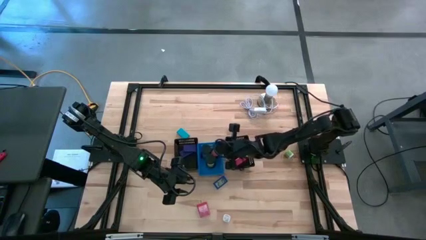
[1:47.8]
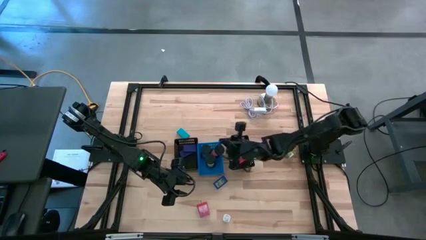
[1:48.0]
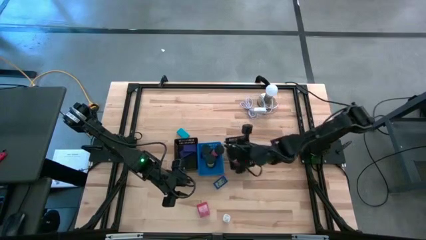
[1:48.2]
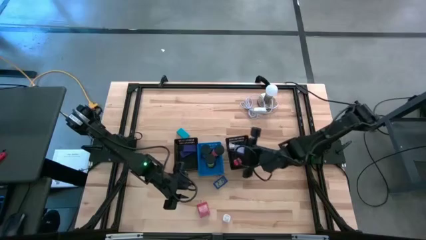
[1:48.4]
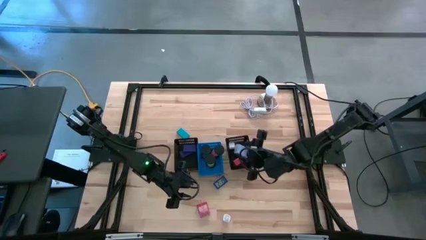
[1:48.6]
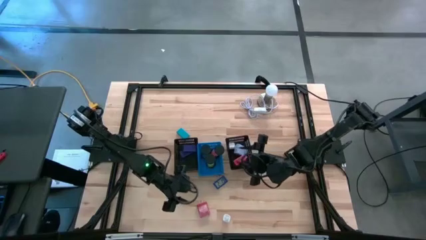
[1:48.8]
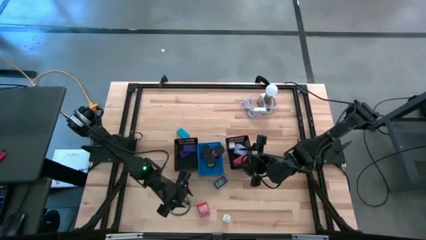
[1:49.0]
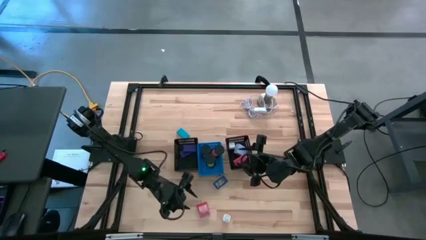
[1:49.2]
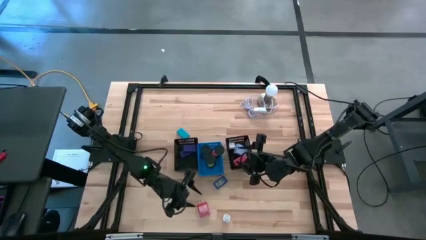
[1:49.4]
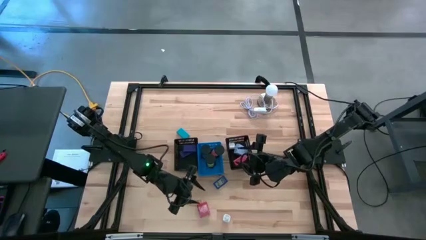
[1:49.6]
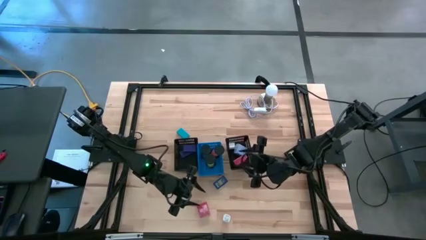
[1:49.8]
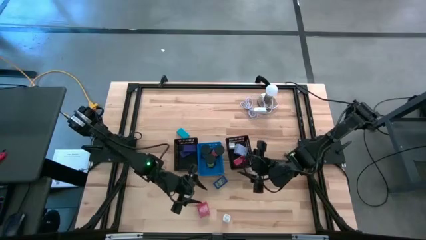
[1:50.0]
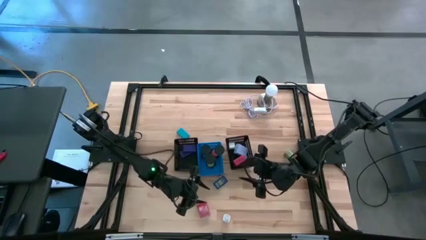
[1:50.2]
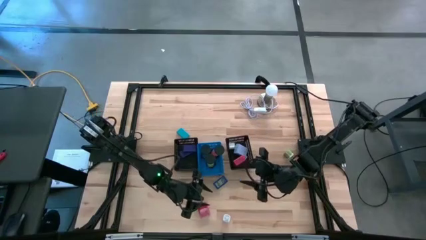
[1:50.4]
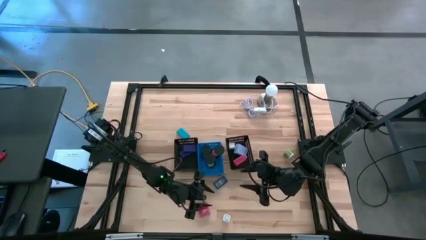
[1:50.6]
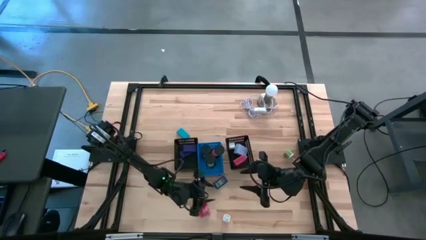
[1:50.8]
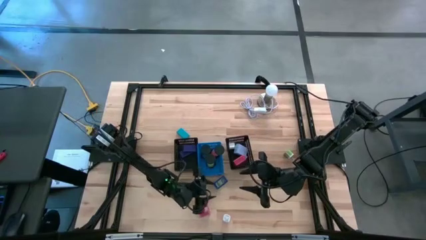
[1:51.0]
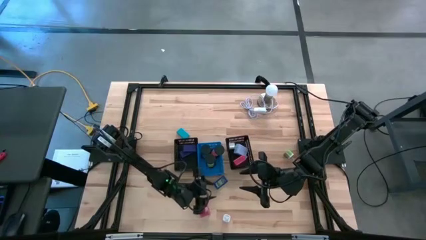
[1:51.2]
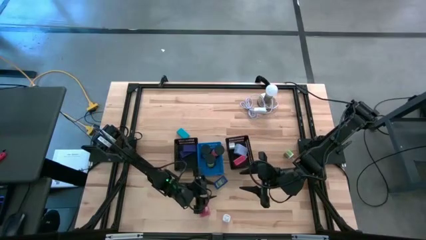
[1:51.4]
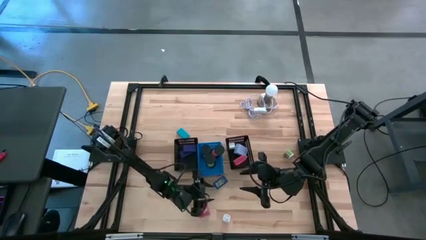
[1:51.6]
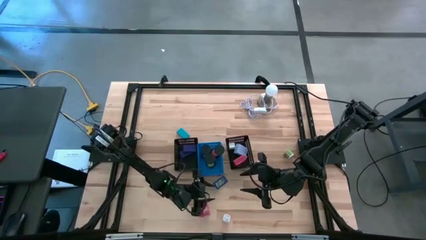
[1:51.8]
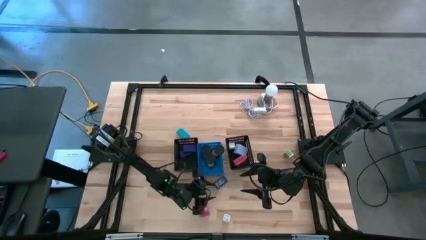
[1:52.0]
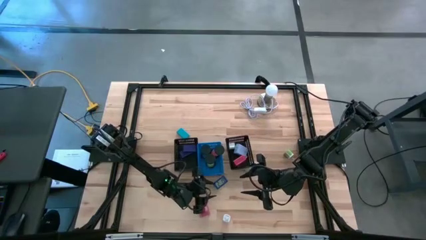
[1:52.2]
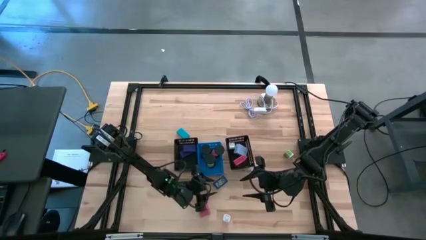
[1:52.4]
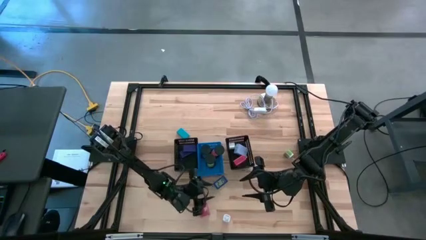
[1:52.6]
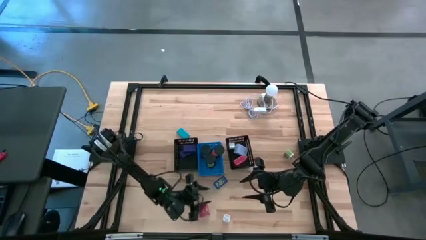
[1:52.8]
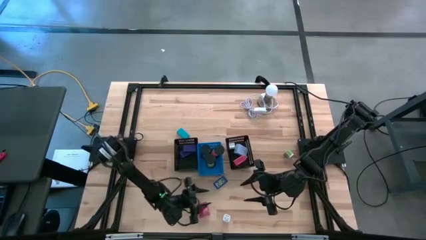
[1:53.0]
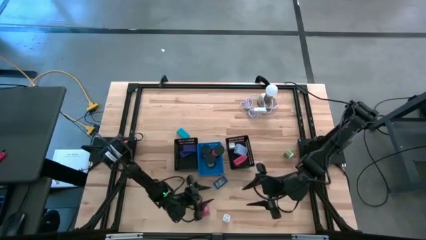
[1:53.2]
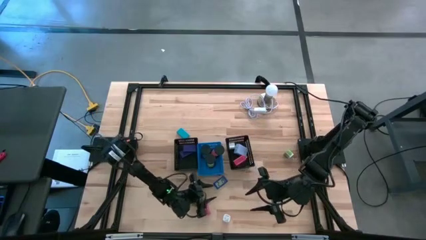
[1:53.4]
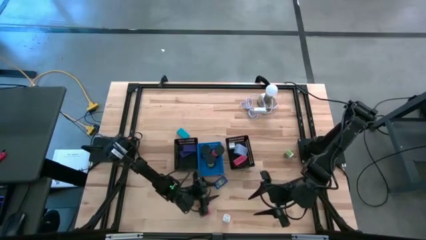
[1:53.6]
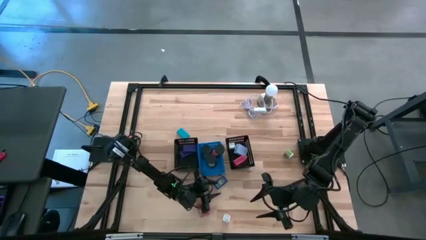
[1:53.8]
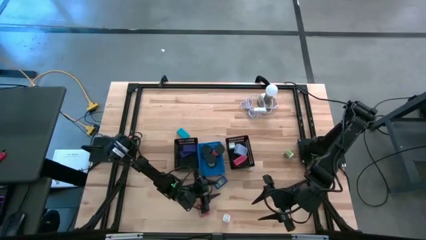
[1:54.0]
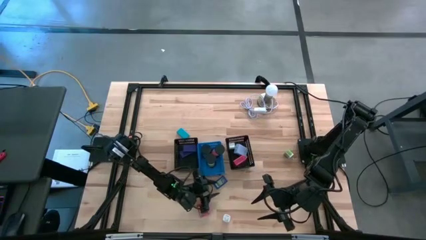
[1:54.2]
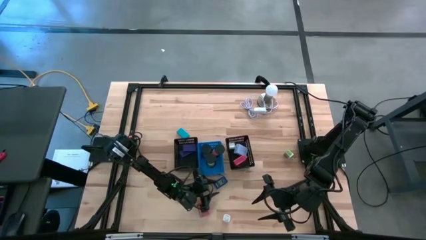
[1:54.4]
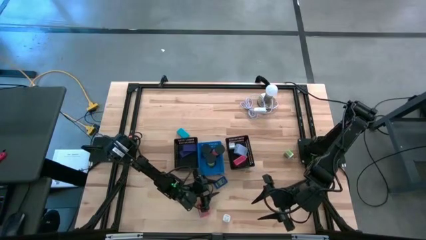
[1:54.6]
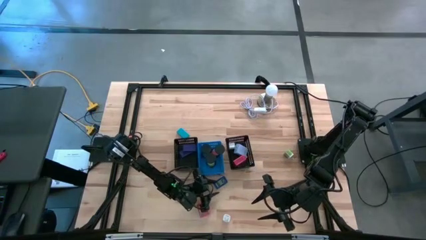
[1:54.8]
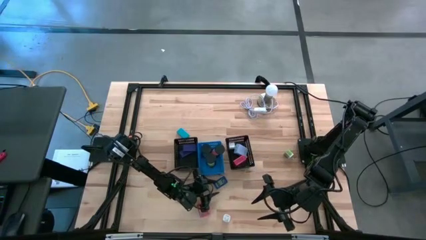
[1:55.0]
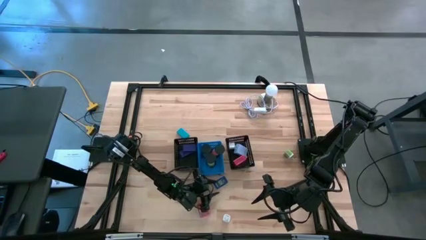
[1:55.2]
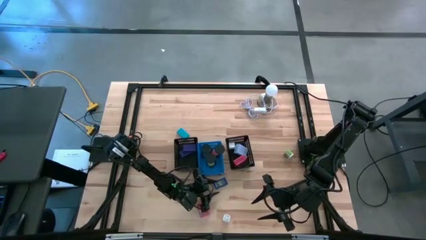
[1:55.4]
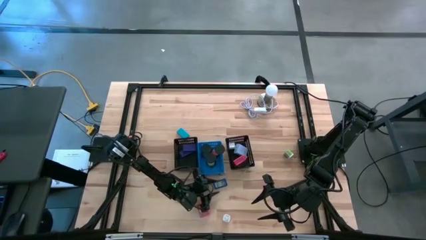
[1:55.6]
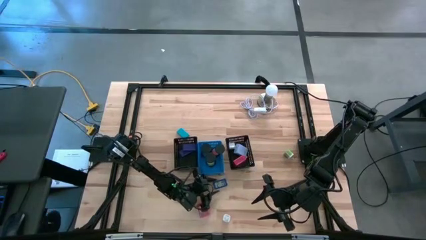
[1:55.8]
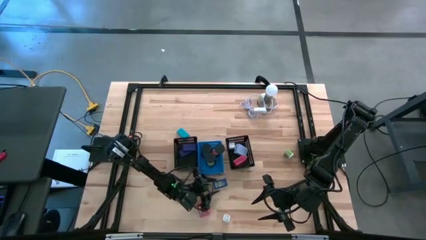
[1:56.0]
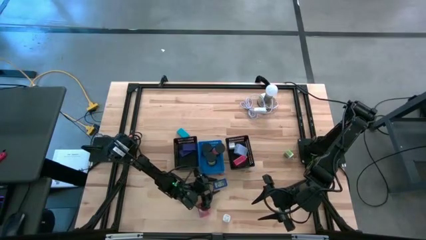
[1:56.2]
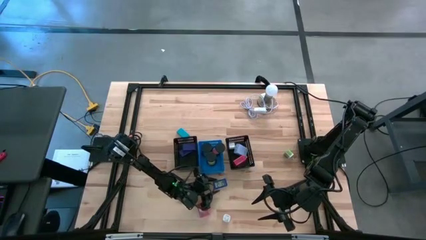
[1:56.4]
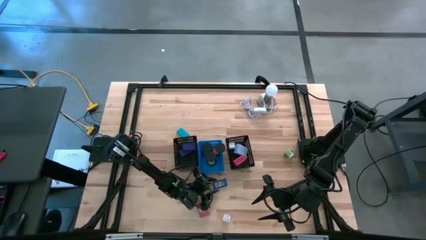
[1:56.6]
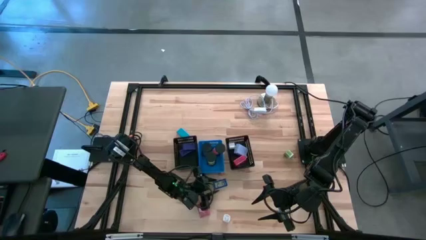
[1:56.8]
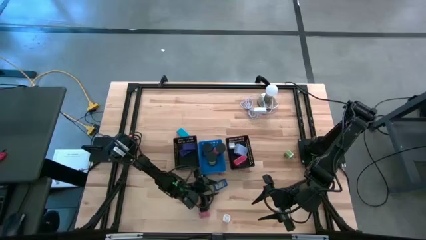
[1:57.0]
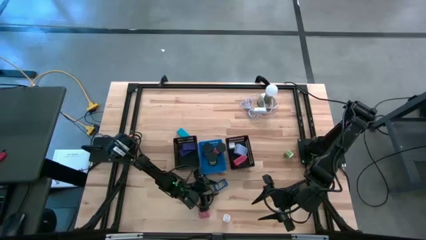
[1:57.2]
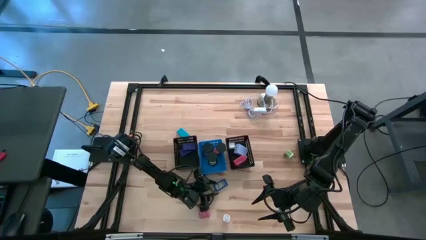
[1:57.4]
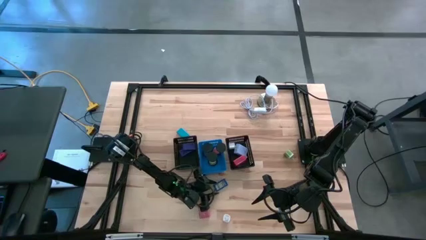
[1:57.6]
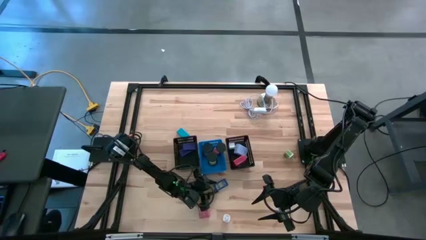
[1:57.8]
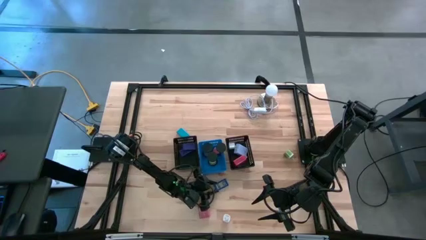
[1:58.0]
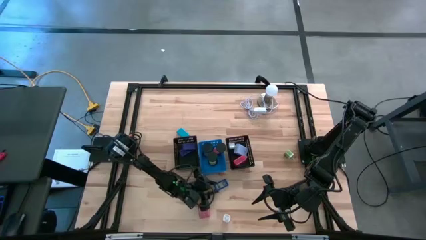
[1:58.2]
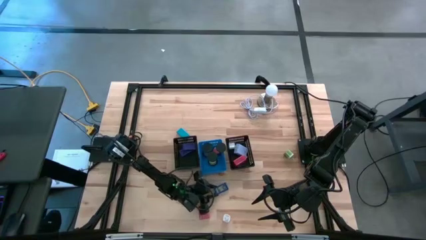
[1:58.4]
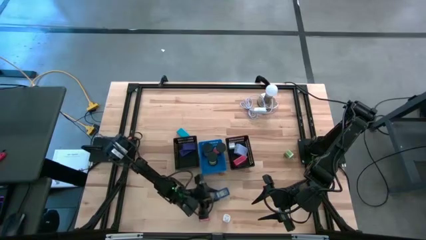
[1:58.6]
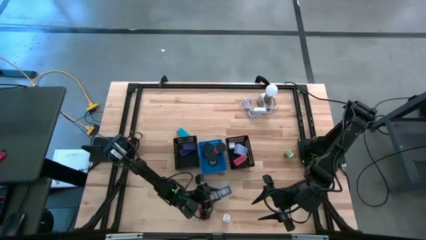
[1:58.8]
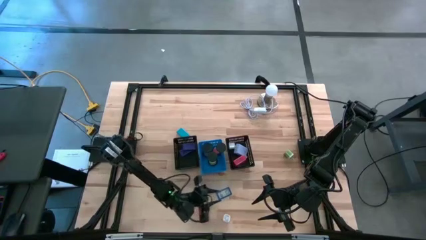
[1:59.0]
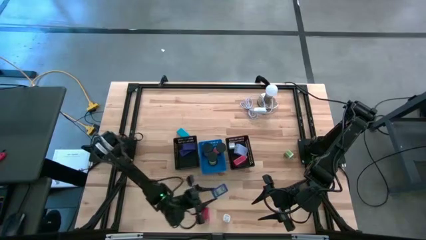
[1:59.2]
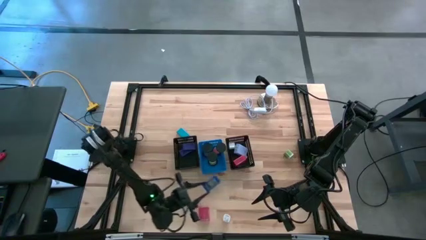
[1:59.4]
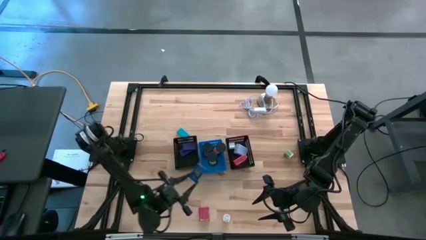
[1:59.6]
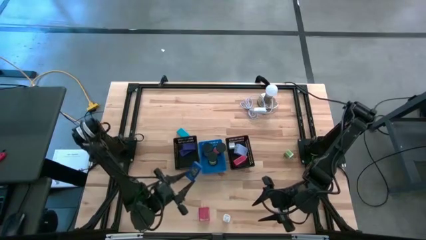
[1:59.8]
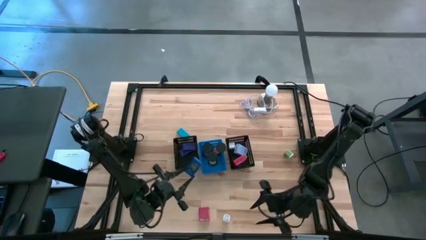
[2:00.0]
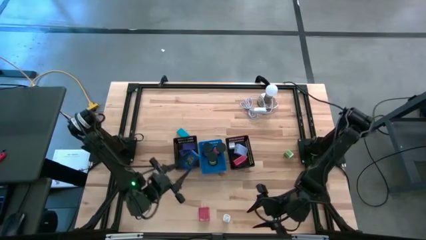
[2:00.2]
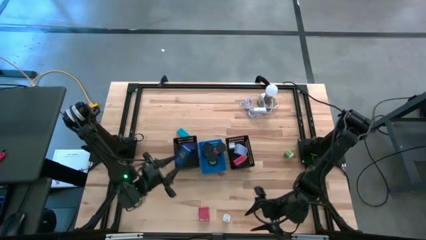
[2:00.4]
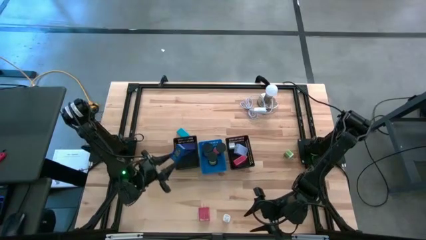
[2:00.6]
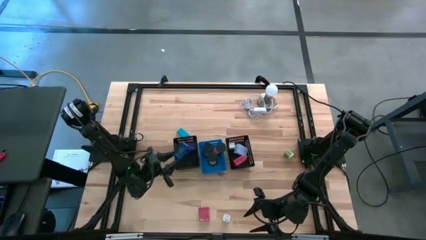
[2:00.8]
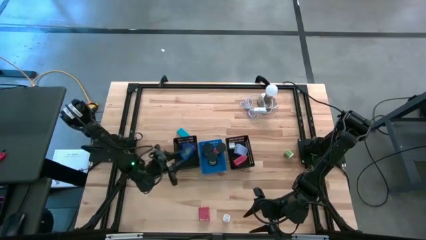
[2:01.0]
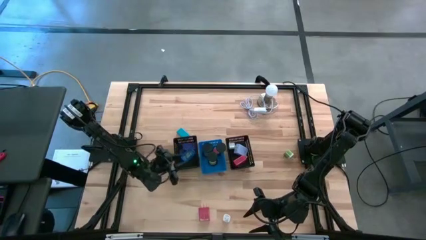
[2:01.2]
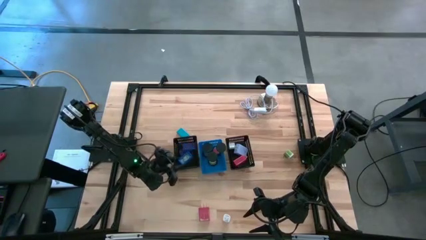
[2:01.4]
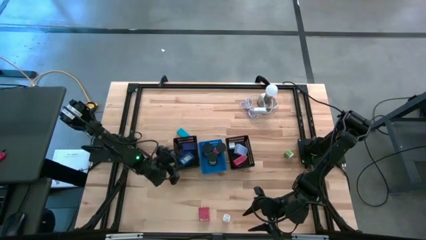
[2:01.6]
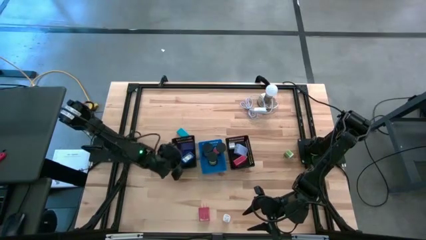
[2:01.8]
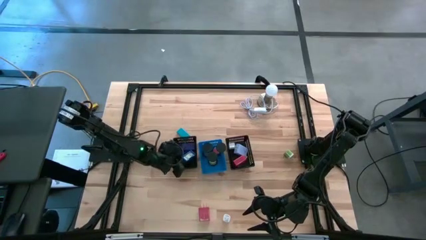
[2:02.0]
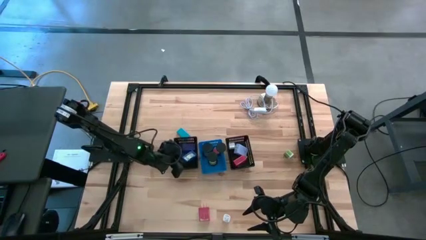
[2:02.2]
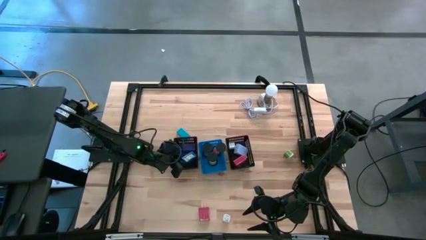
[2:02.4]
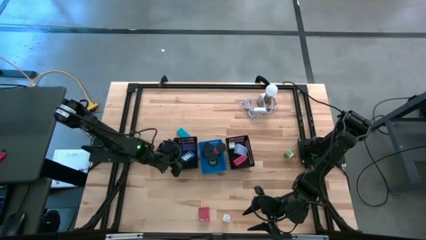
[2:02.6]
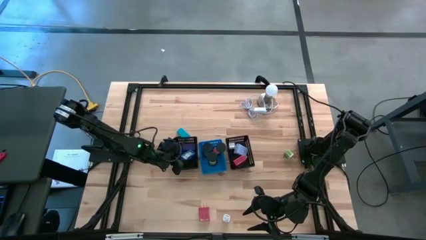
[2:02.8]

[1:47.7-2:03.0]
Task: Pick & Place Office items
Put the blue digital clock into the left black bin
